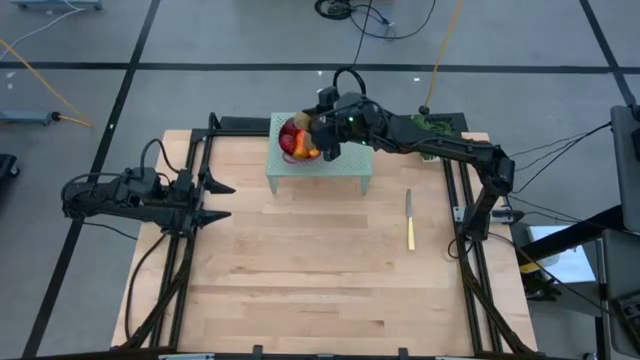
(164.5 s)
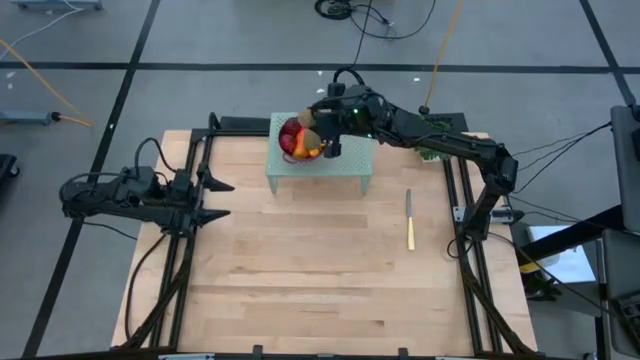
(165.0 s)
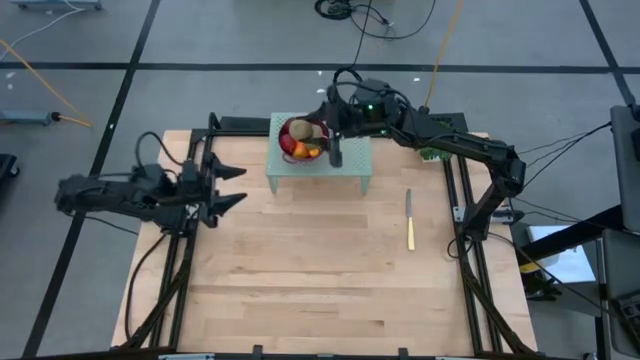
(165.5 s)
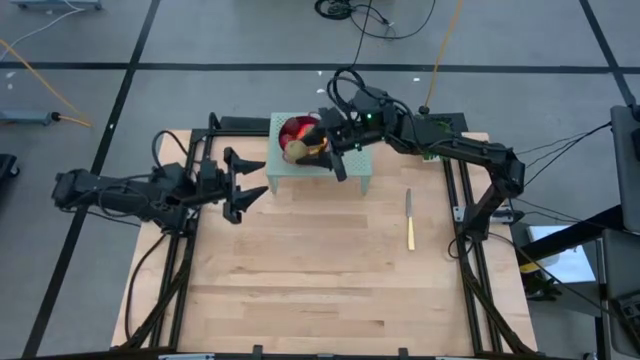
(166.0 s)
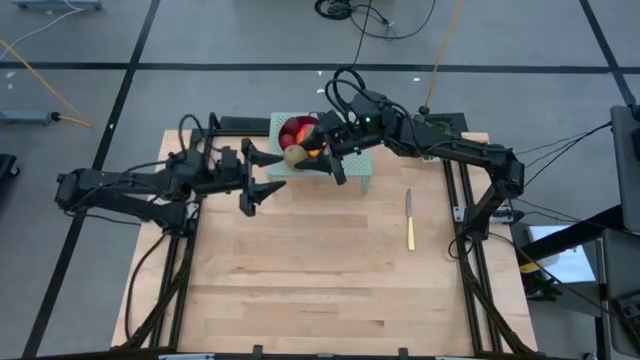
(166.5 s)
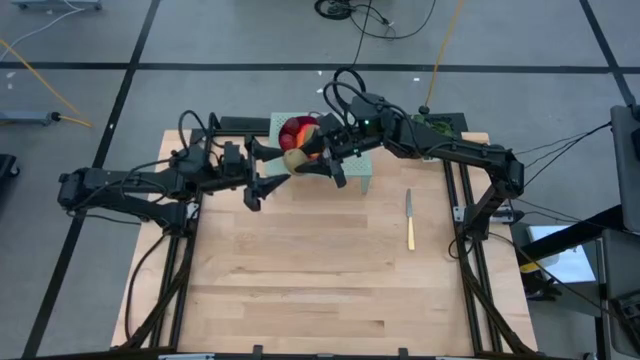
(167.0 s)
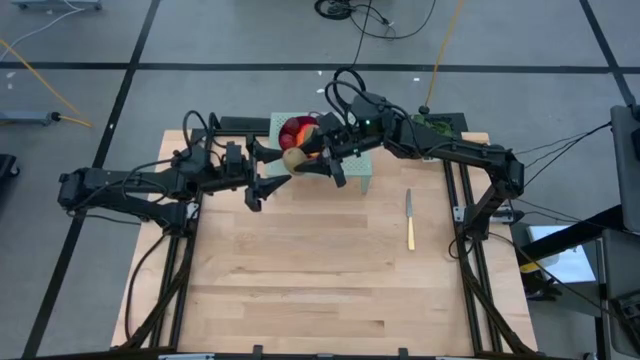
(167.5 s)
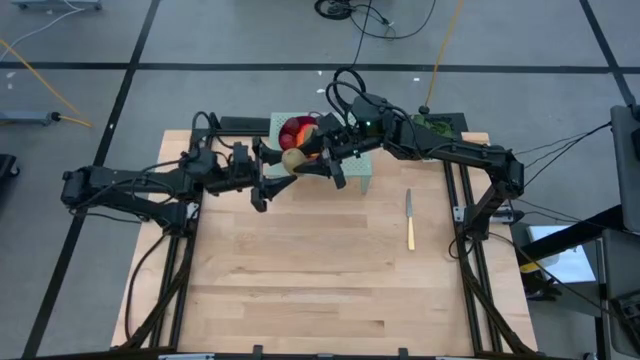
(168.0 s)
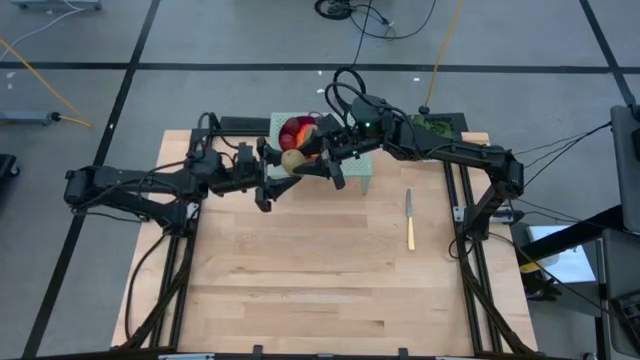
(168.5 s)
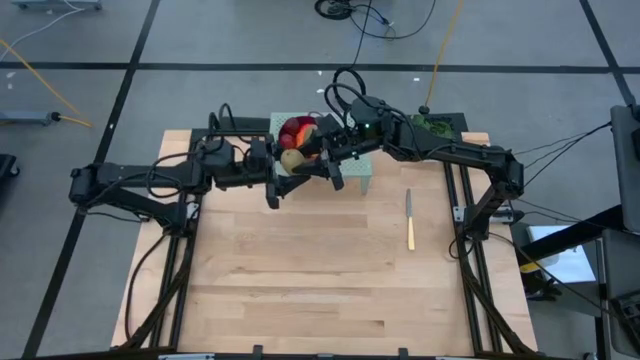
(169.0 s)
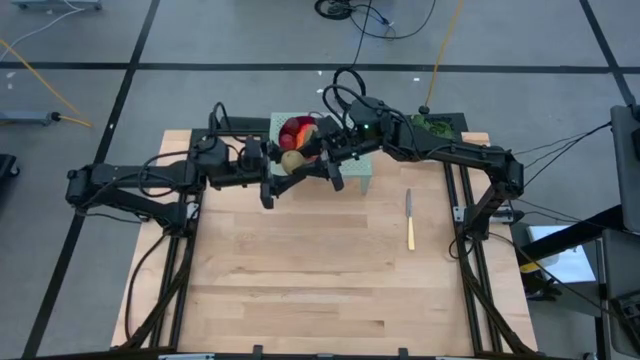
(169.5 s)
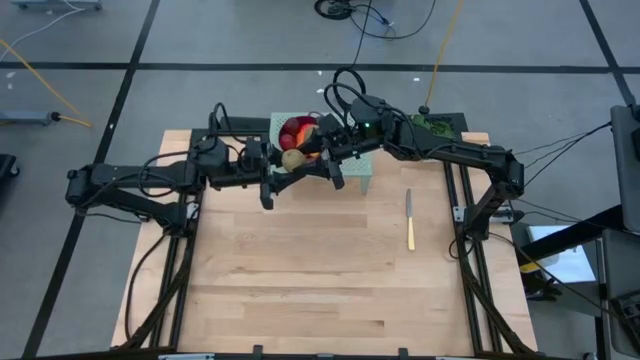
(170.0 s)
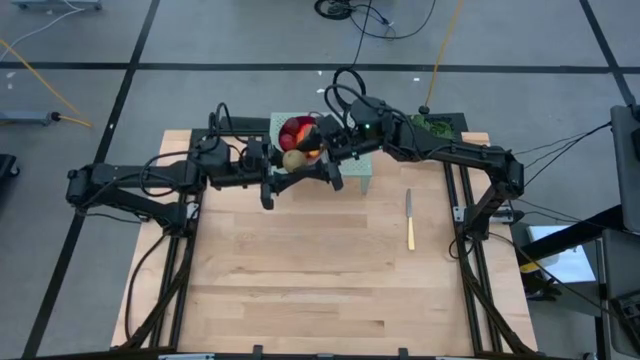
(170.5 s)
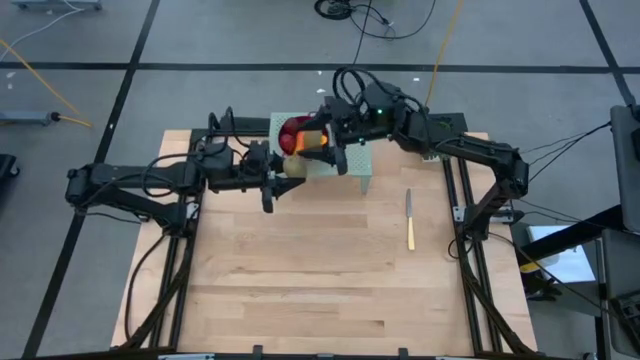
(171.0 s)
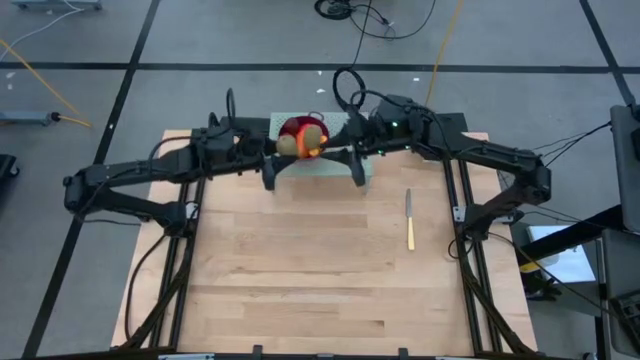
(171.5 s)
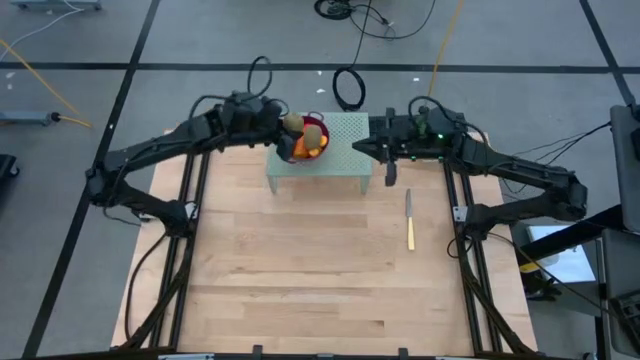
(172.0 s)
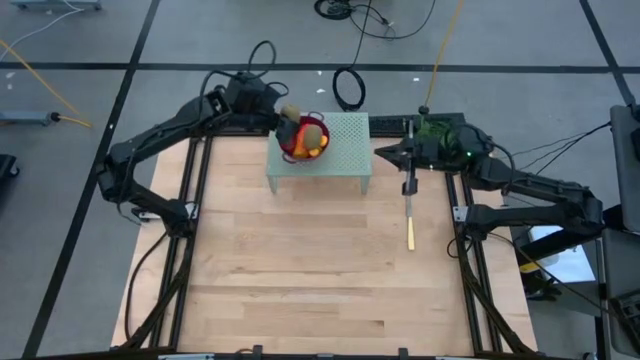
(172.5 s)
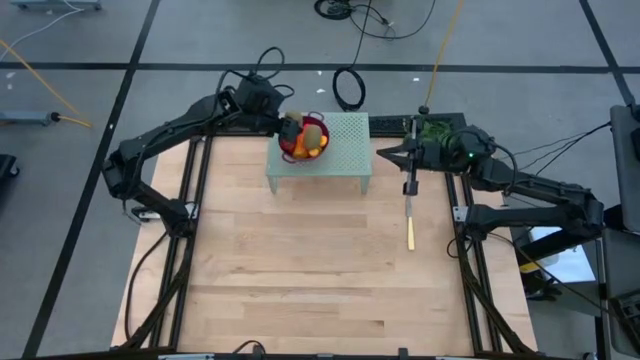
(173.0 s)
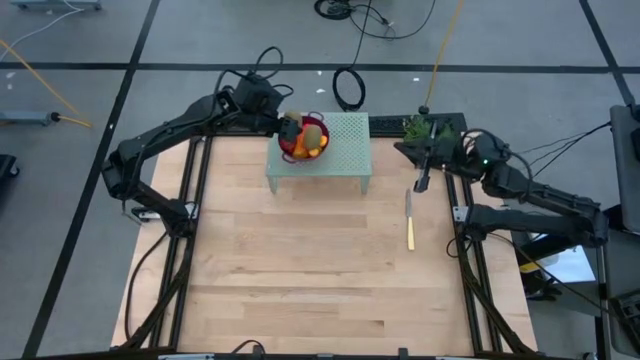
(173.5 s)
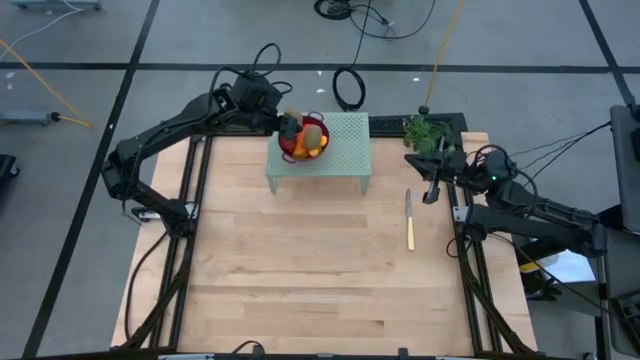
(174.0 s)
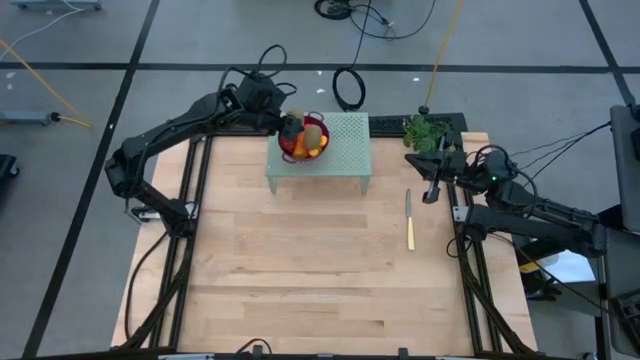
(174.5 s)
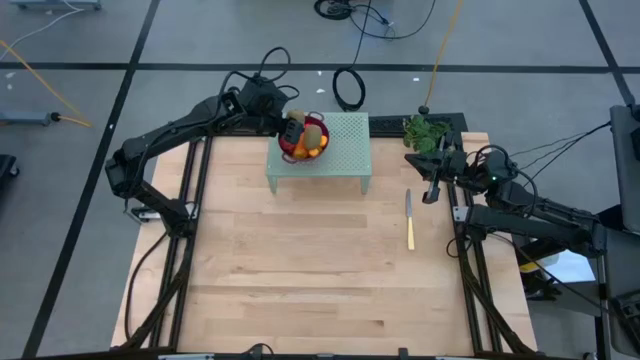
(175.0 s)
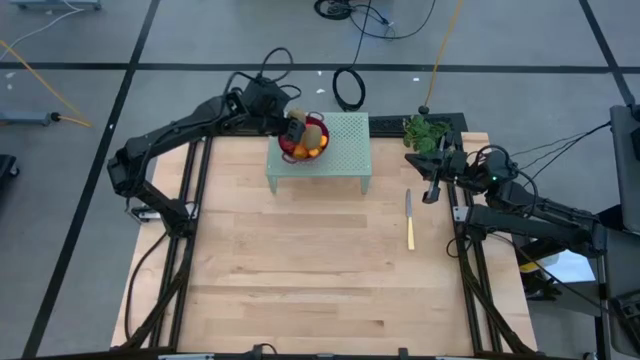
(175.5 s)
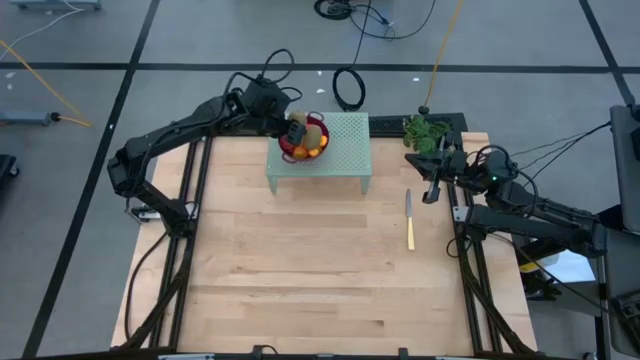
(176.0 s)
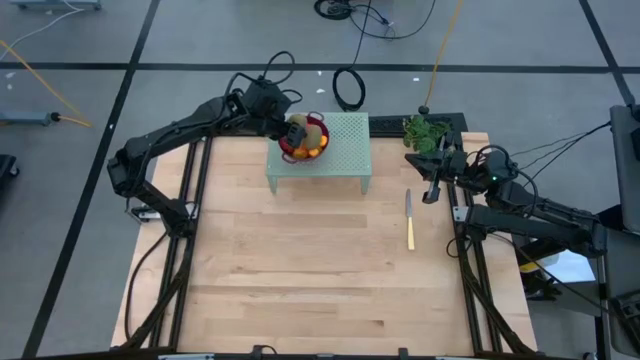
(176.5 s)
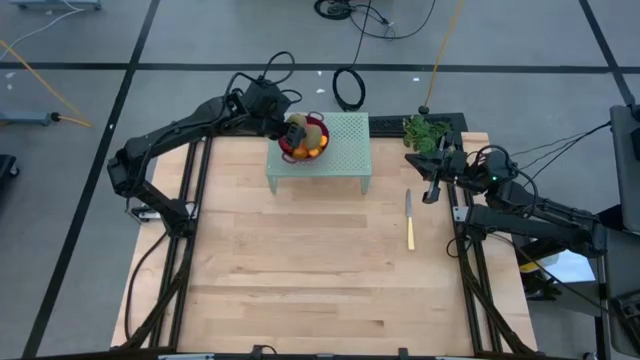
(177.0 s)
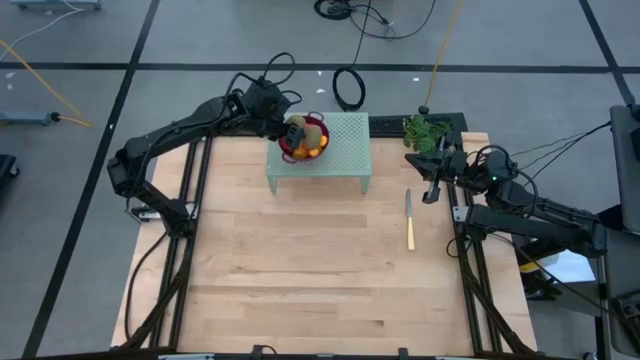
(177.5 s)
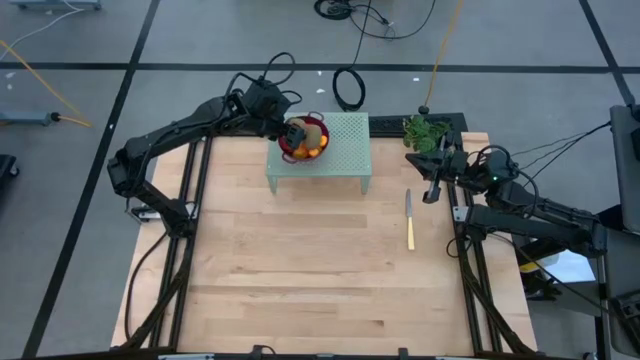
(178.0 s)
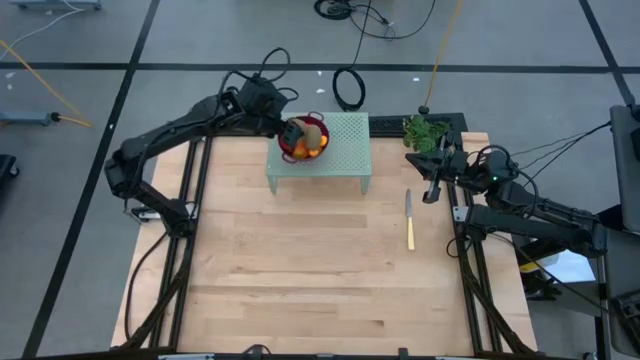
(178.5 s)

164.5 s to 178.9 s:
Task: Pick & Place Fruit
Put the kiwi into the violet strainer bowl on the shelf

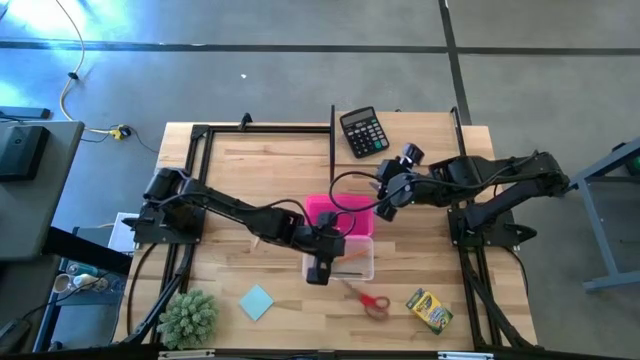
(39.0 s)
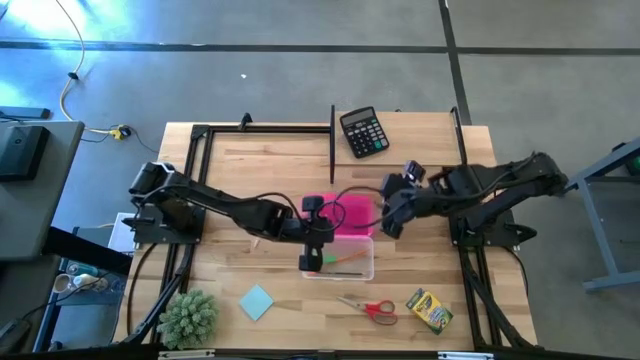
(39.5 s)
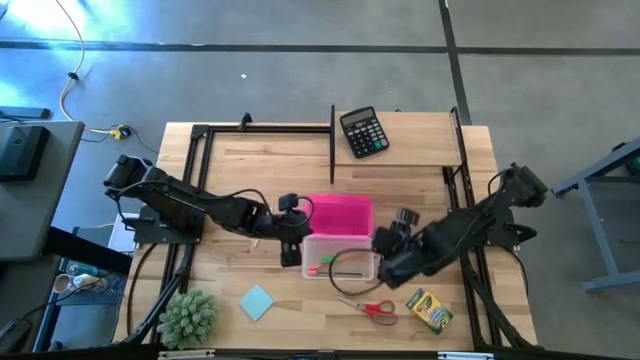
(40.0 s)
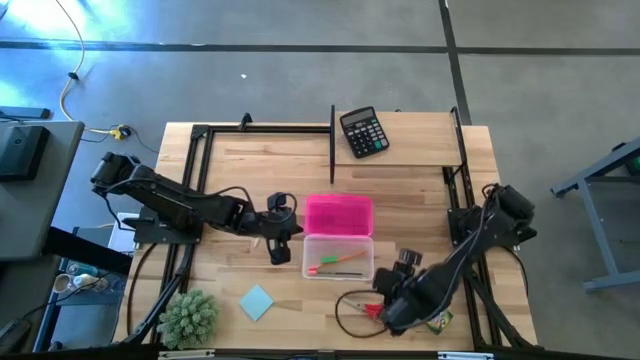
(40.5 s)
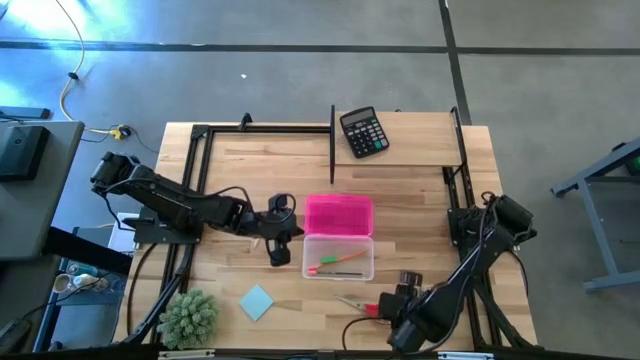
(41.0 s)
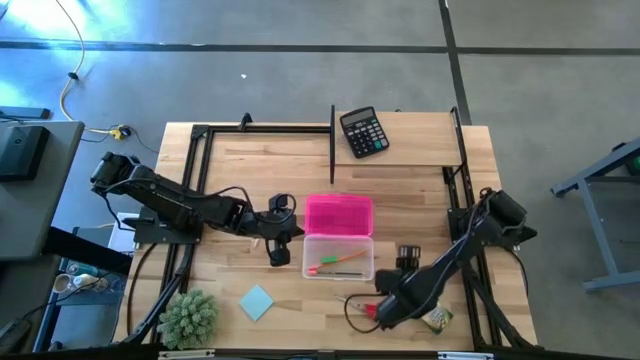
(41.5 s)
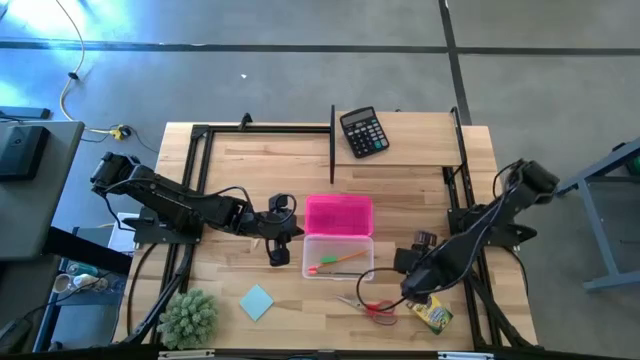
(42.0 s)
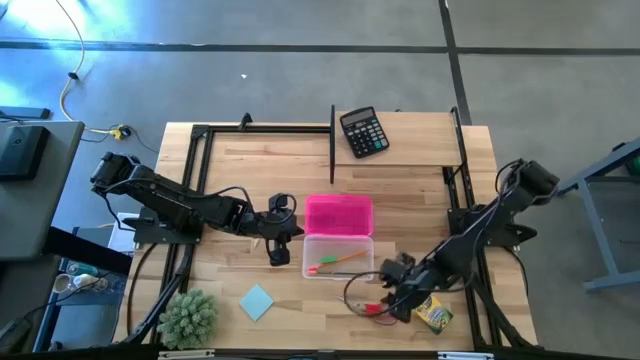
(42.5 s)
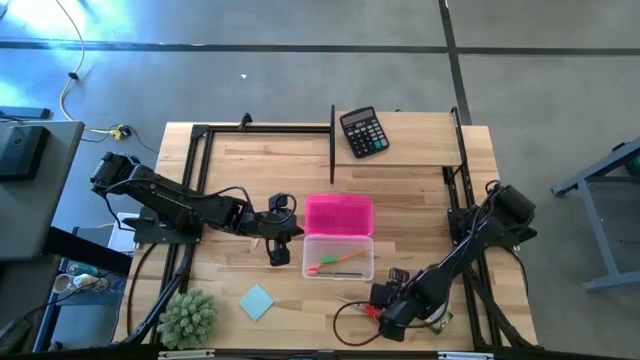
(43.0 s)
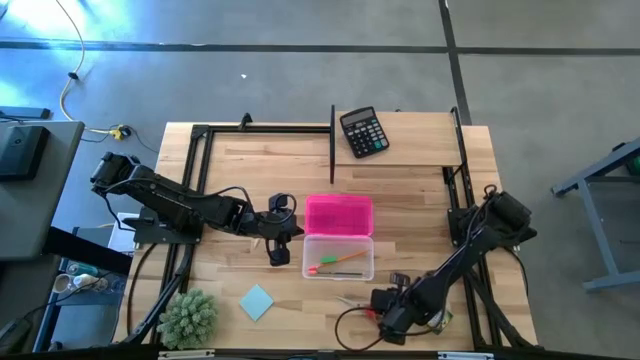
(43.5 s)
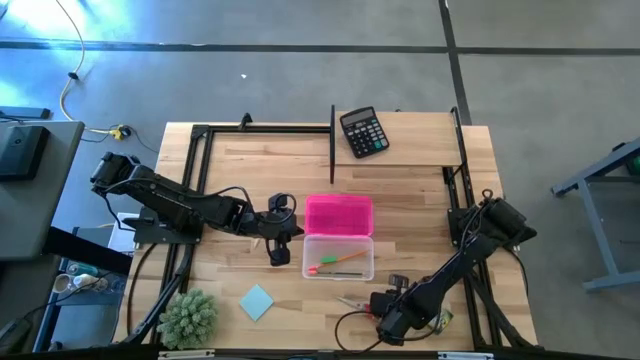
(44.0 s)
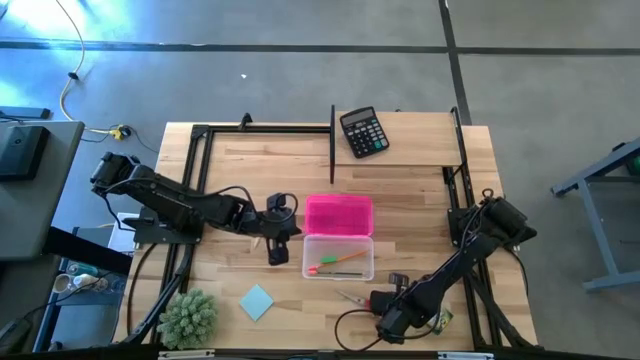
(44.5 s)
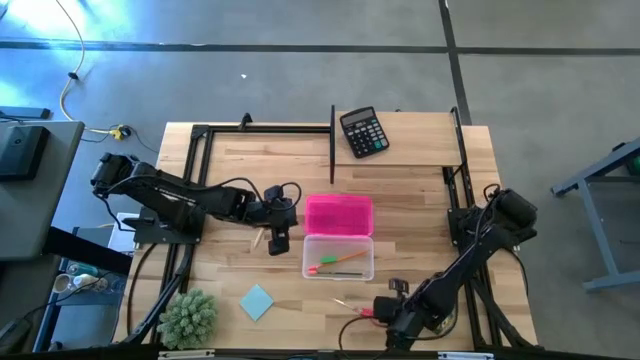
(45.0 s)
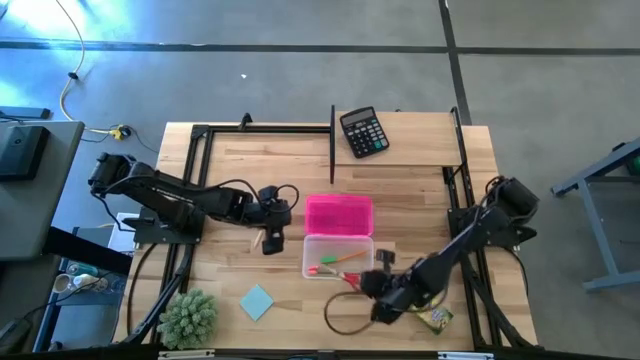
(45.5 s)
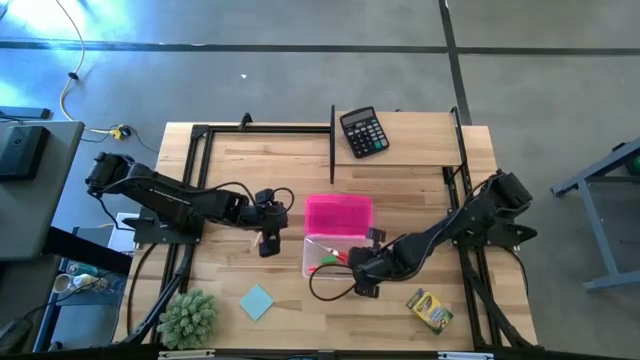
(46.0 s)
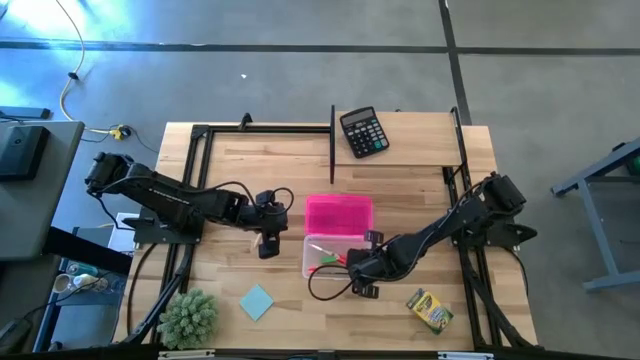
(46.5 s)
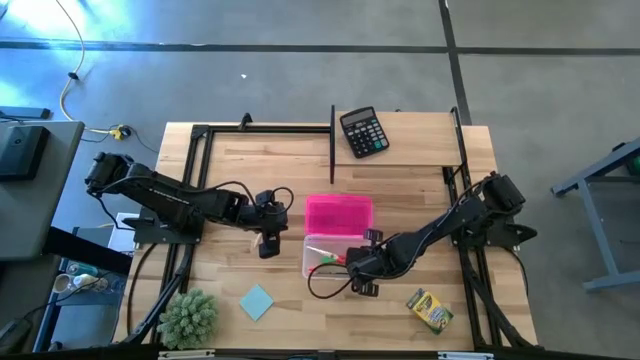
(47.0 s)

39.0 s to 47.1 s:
Task: Pack school essentials
Put the red scissors into the supply box
